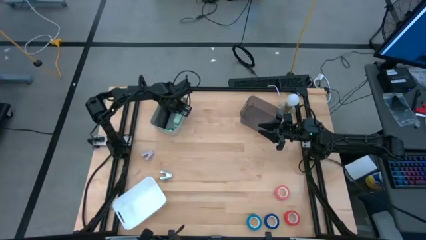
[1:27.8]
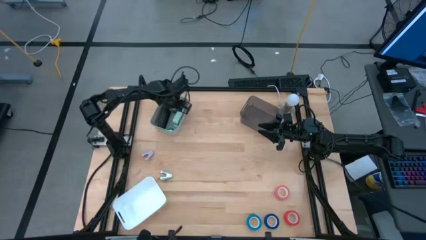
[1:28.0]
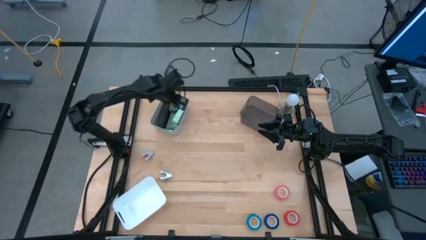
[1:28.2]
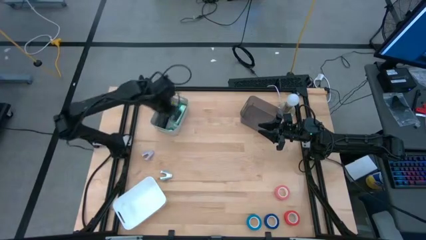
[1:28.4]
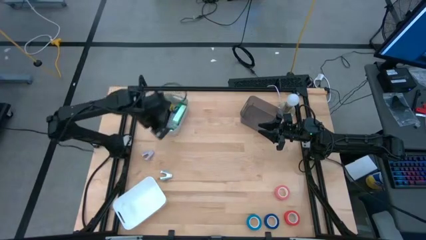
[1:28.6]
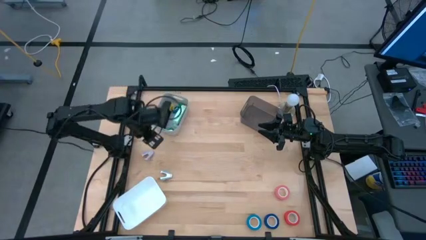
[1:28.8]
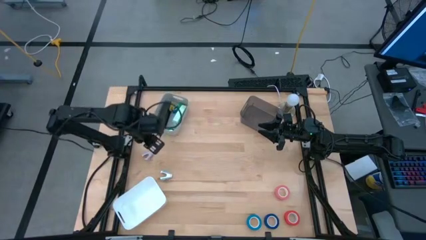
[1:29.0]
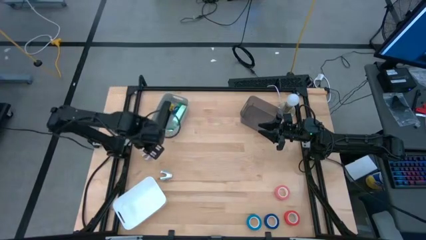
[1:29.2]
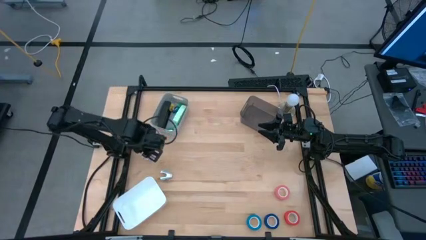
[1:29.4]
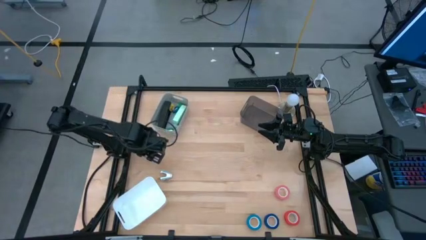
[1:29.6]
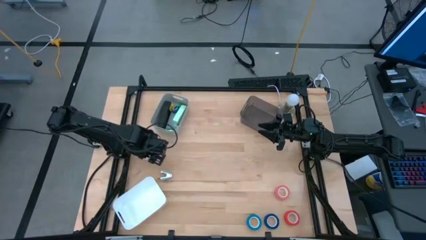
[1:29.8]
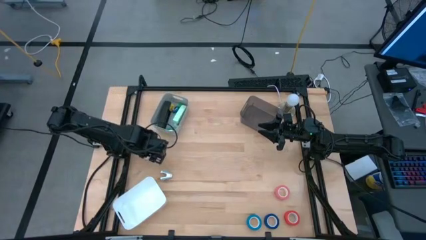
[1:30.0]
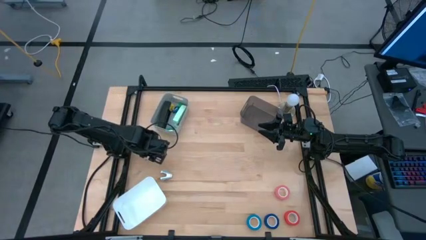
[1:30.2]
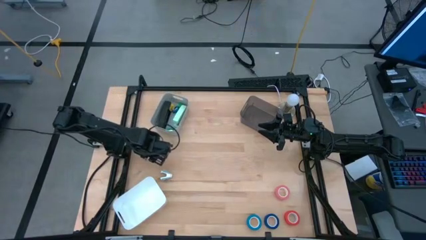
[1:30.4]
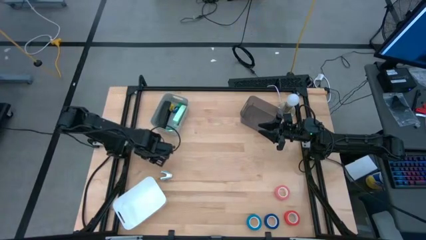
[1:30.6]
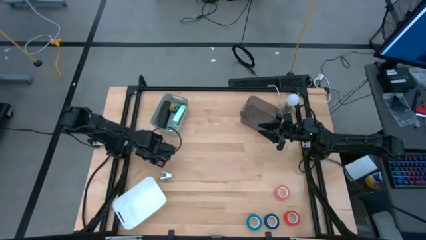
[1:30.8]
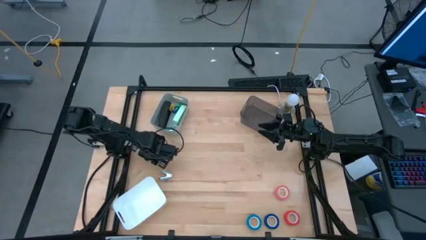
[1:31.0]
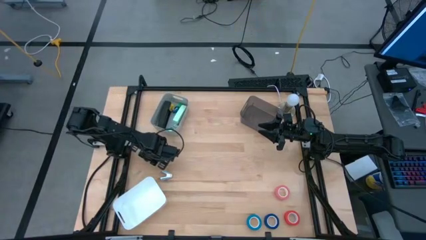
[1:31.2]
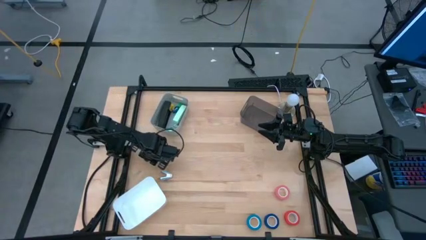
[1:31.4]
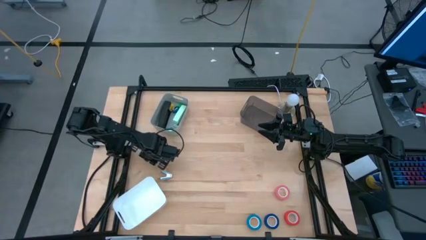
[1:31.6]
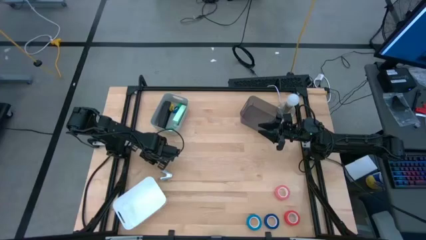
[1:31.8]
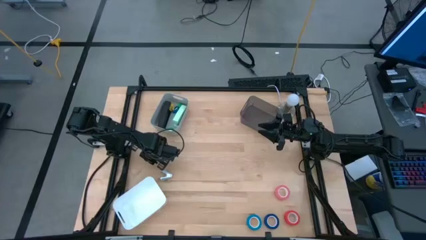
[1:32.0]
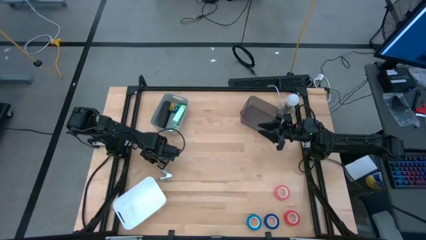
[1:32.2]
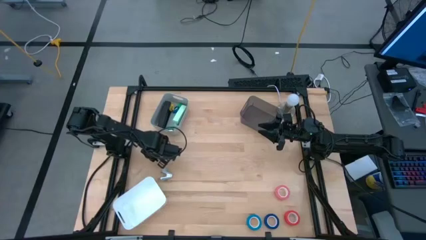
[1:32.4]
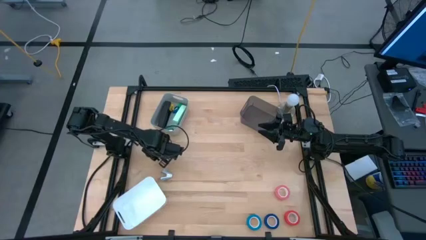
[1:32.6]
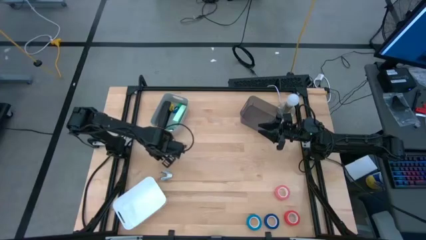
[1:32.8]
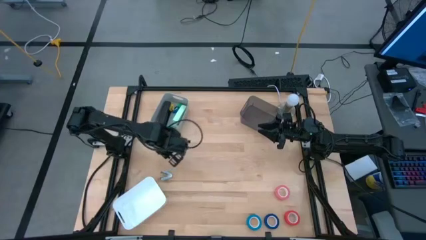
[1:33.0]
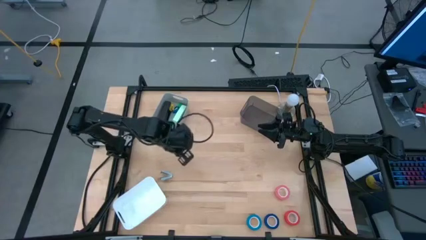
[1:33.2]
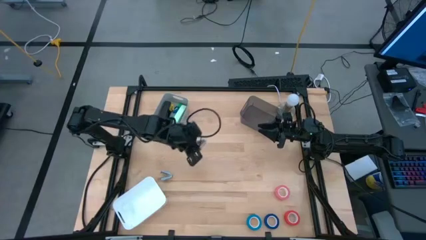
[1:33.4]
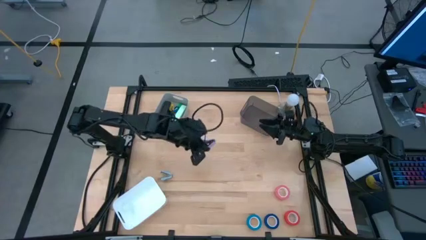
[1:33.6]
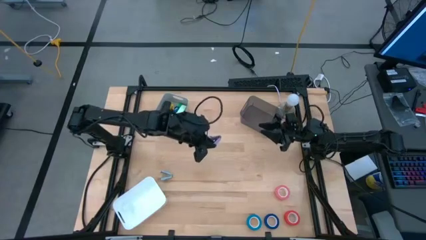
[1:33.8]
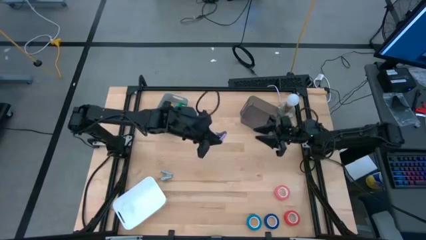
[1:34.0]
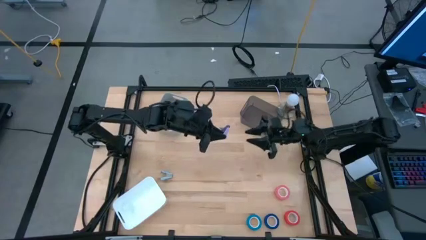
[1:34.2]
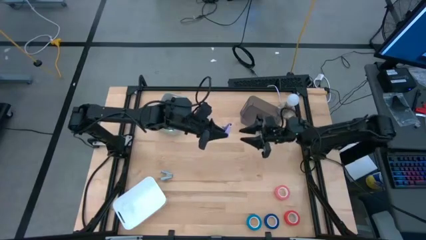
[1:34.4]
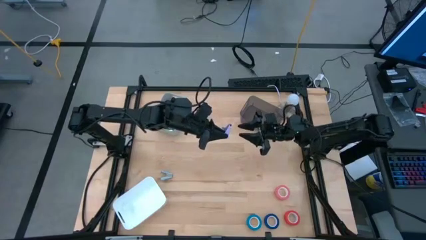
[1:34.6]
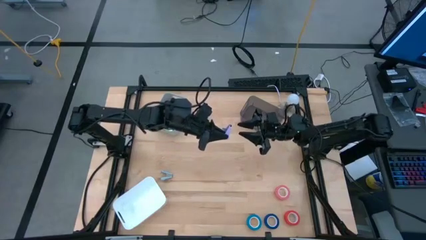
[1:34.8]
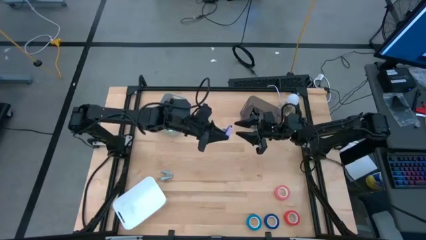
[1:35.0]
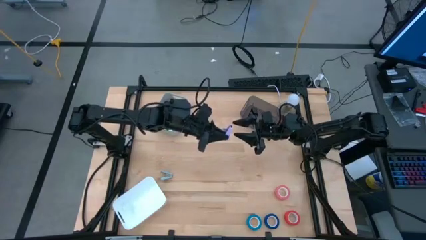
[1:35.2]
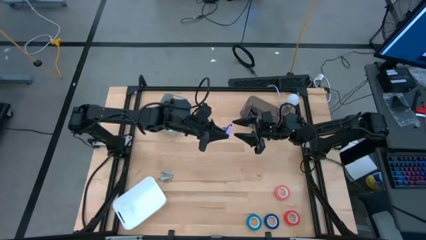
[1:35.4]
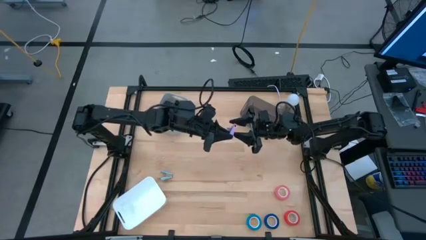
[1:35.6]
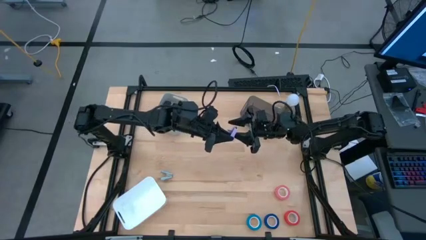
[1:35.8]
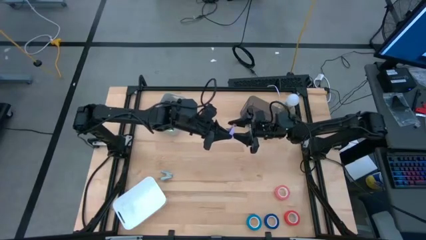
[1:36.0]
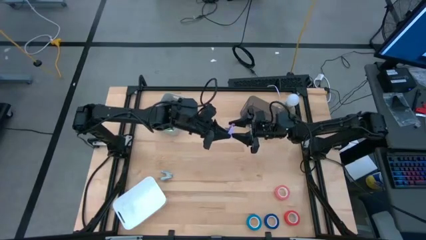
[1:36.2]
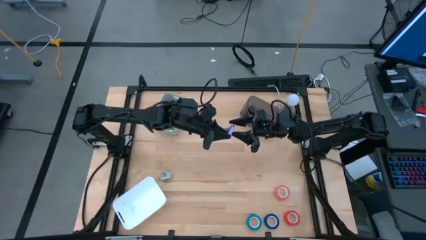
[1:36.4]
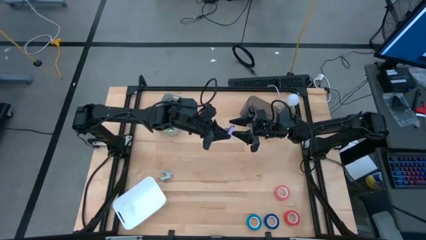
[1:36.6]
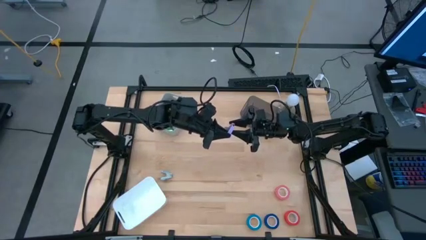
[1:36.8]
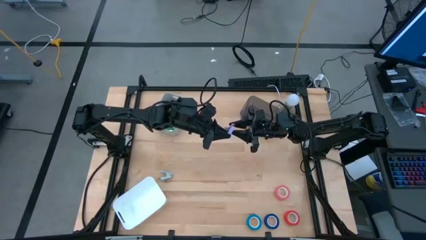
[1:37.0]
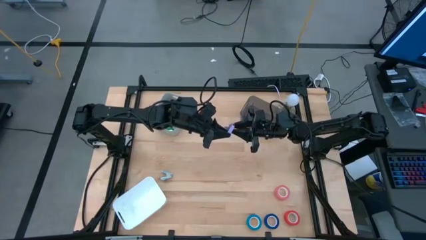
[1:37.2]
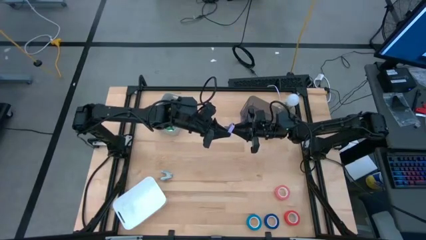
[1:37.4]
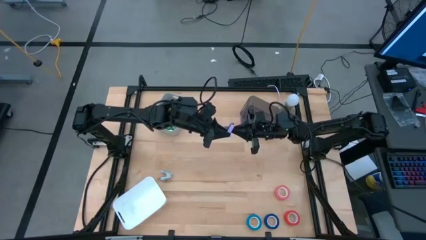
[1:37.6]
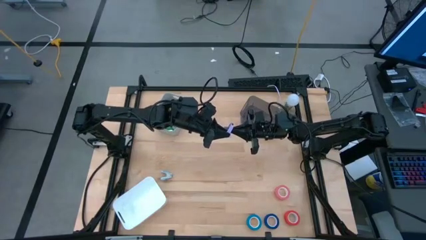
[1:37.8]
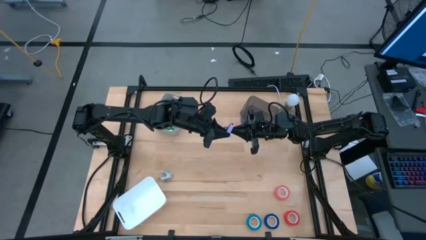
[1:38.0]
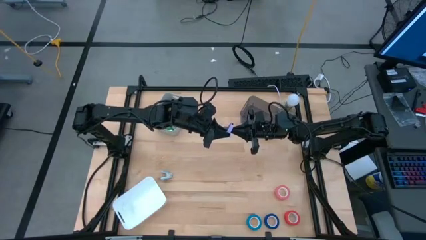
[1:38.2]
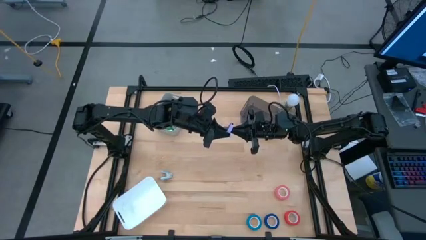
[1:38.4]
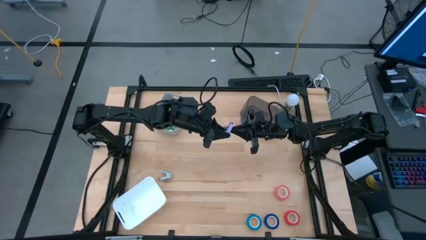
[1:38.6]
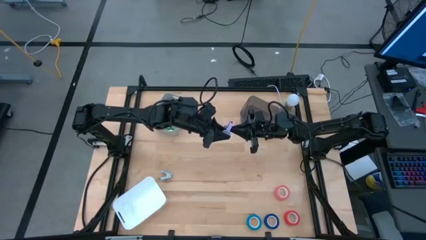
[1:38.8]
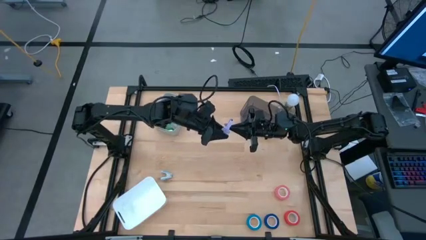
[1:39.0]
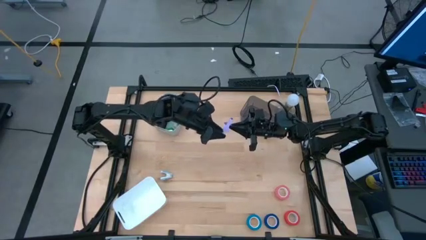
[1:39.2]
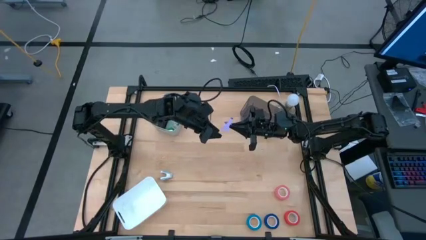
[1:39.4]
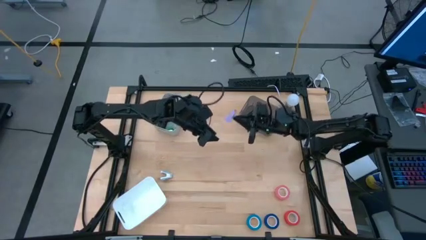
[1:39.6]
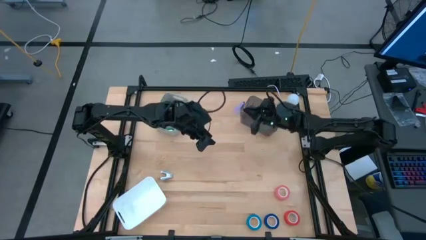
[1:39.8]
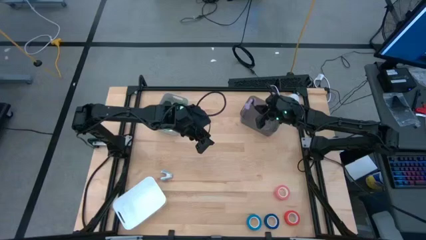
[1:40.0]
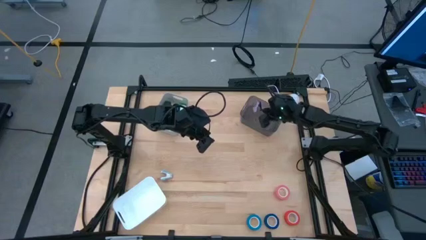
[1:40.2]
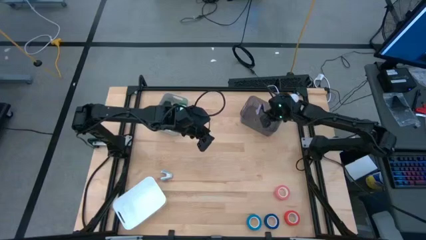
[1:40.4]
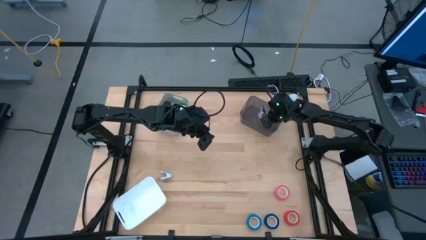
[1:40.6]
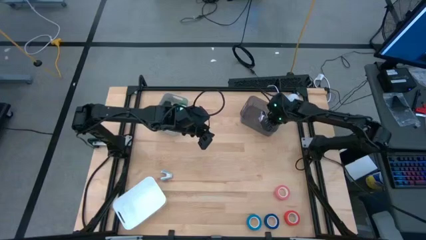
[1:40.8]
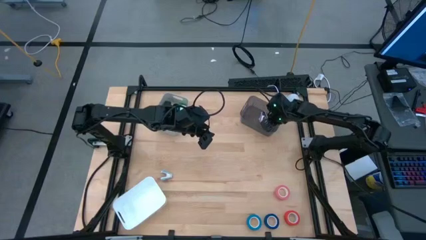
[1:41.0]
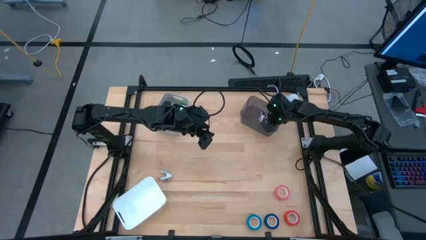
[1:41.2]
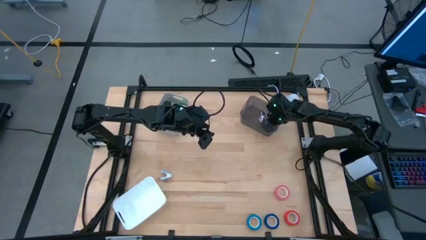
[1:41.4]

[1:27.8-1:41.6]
Task: Pick and place Stapler, Stapler remover, tape
Put the purple staple remover into the black bin
